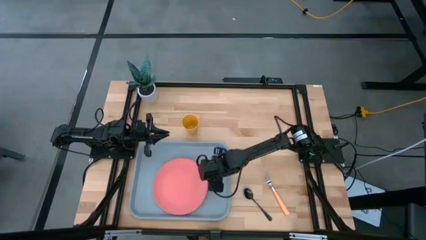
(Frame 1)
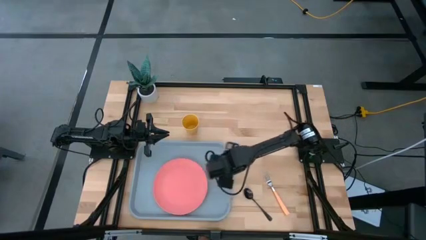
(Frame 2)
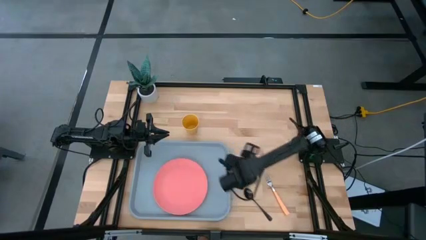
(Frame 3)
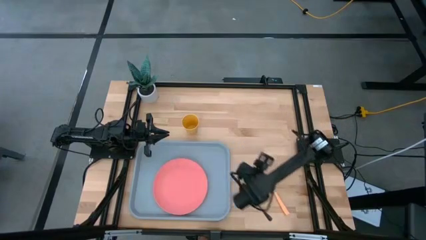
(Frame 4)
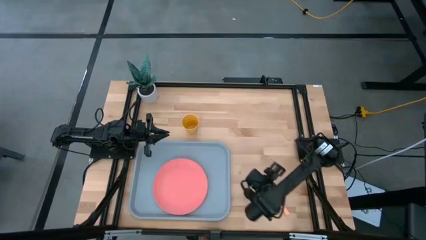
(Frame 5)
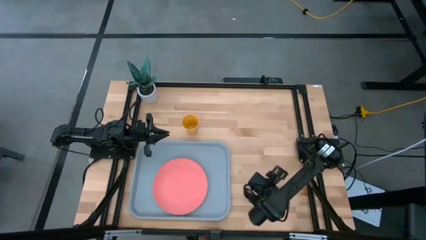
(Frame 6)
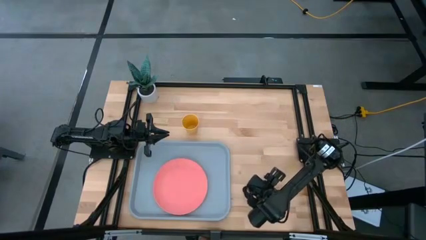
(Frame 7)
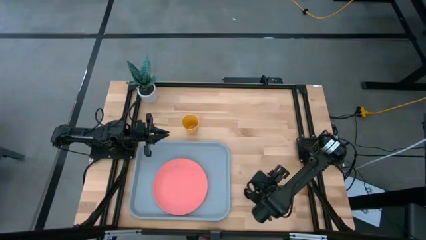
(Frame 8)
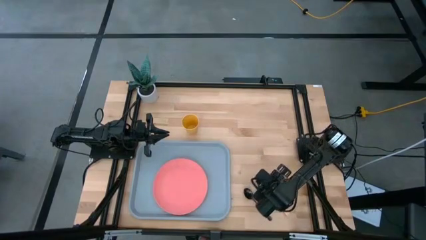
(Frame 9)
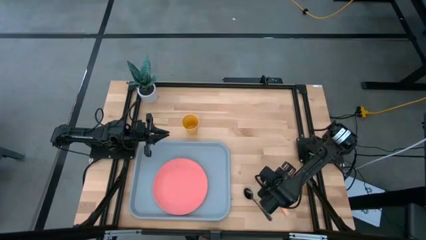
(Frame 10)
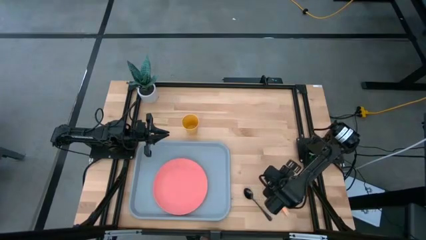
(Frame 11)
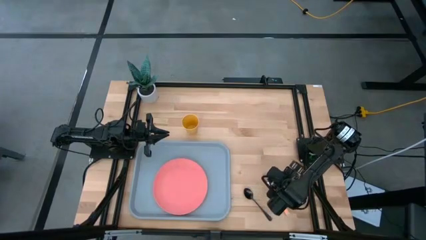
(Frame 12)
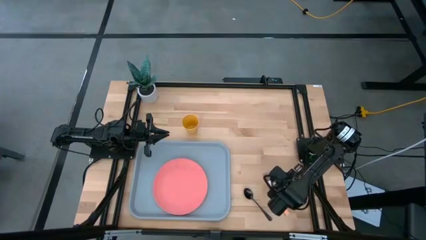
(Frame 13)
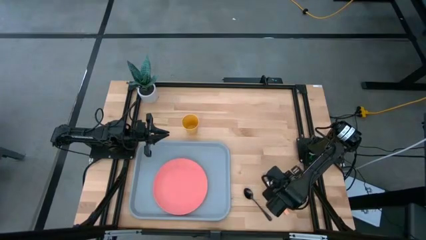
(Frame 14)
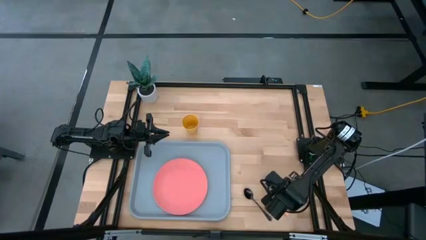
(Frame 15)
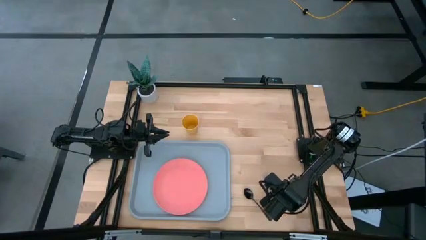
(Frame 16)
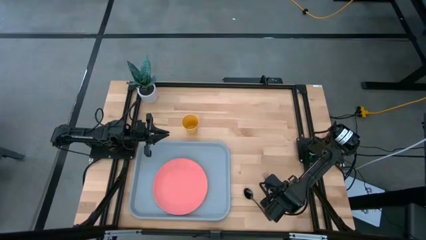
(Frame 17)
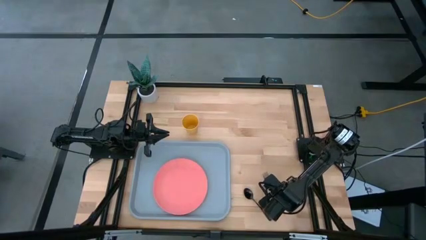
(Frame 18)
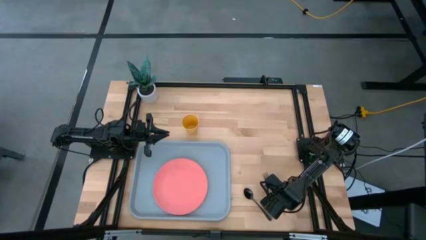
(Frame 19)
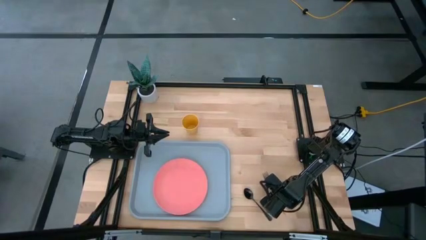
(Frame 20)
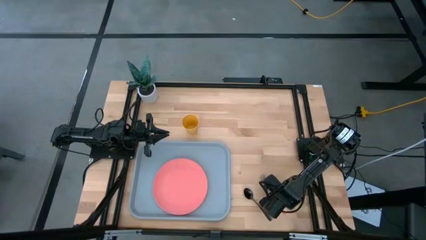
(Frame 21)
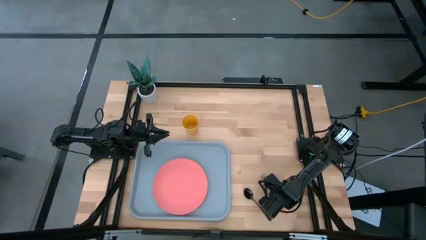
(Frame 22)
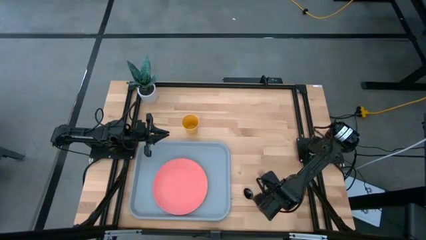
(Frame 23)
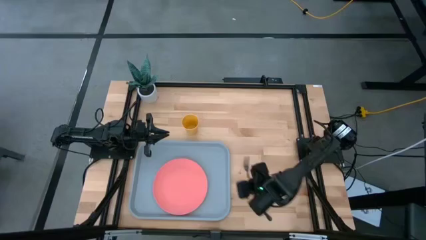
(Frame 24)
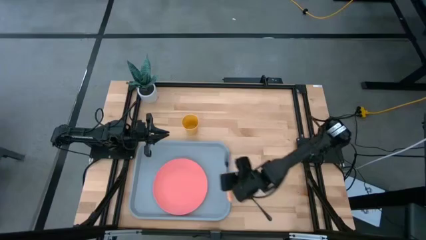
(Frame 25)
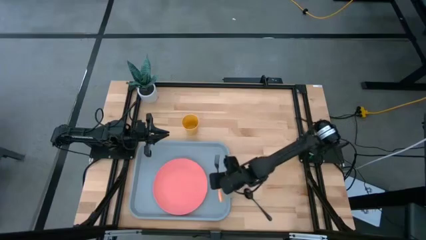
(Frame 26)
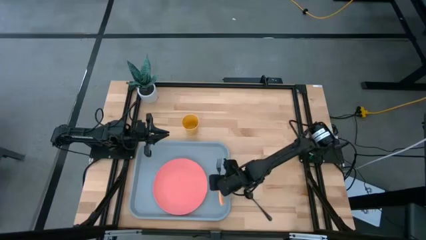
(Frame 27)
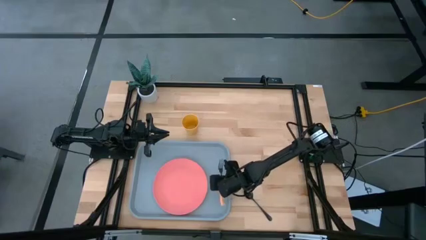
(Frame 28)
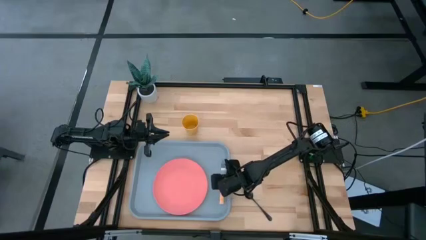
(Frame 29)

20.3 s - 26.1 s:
Task: Pick and place plate/cup/fork/spoon on tray
Put the yellow fork to the right of the pink plate on the grey tray

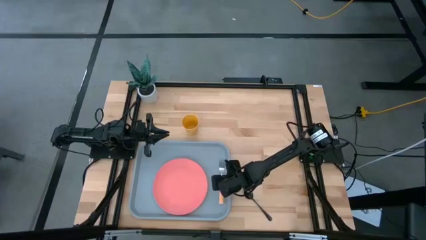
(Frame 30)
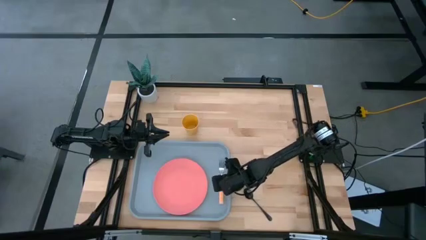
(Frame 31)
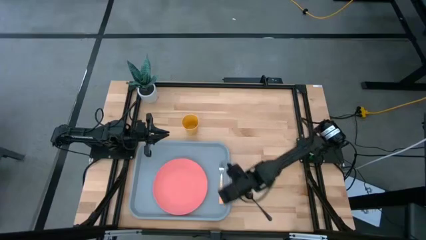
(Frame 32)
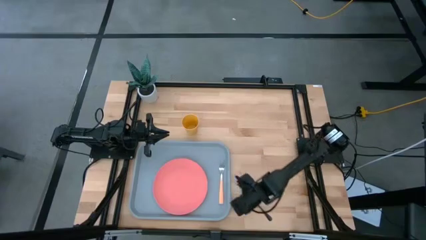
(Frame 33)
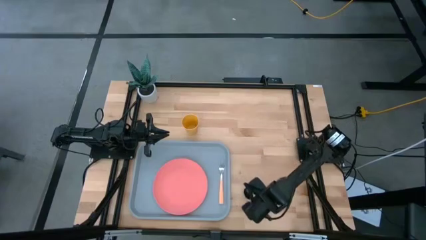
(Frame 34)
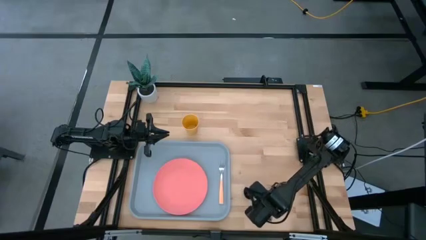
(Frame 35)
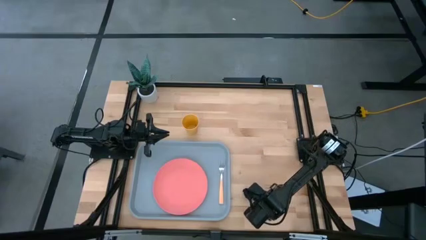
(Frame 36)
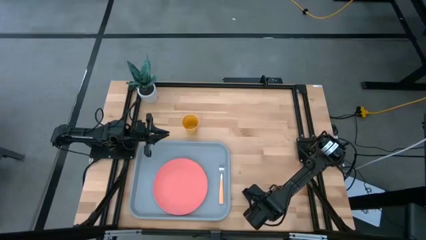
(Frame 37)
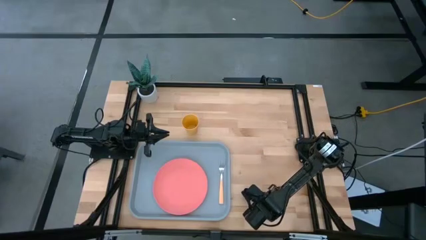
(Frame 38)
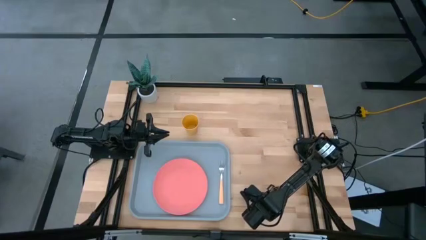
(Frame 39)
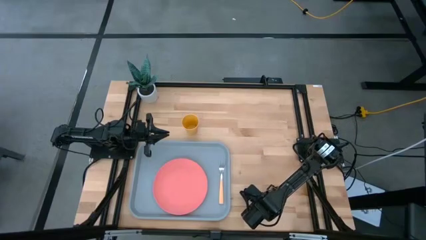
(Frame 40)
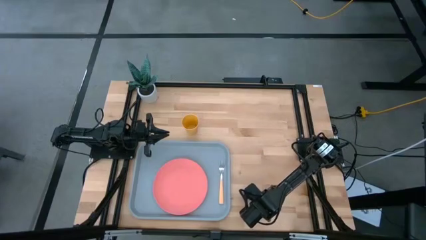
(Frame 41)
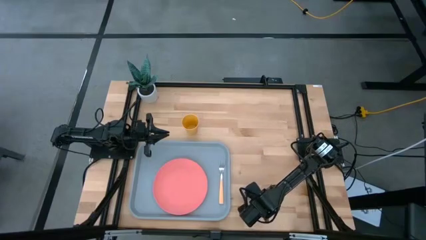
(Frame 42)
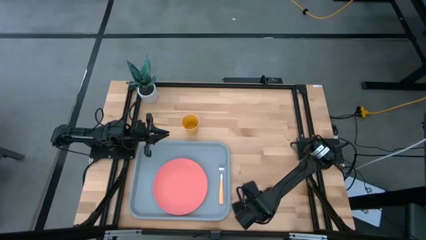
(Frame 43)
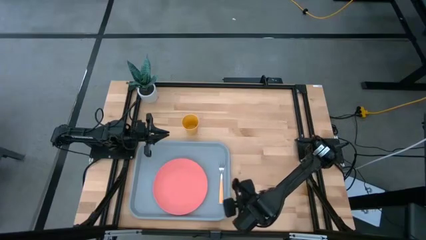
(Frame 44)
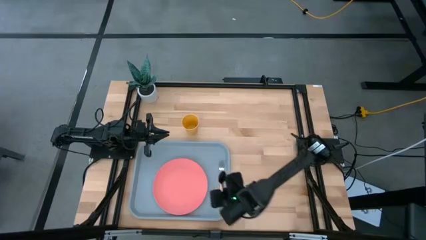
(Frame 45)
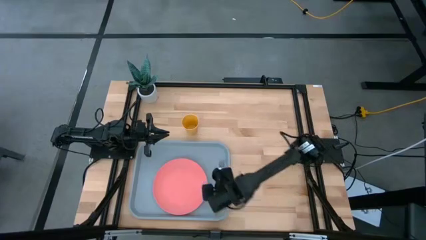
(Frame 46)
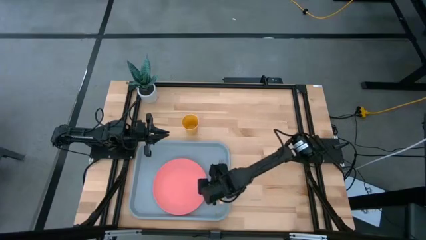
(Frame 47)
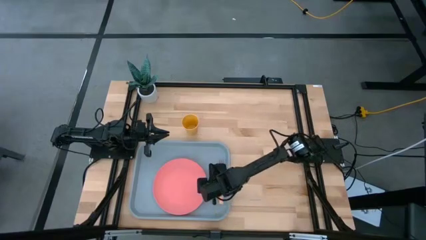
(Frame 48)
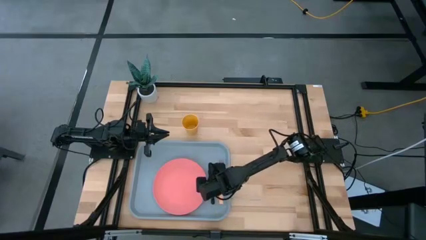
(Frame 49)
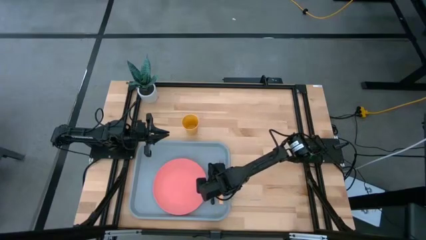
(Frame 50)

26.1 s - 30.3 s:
Put the black spoon on the left side of the yellow fork on the grey tray
